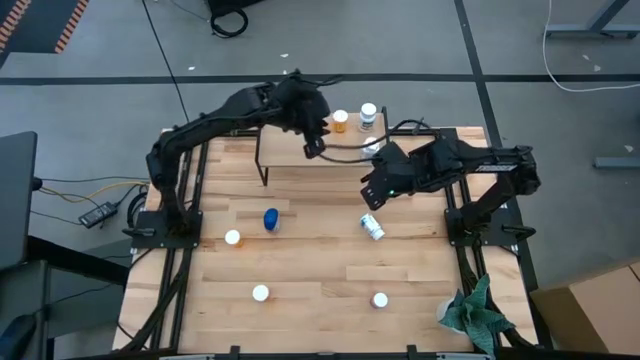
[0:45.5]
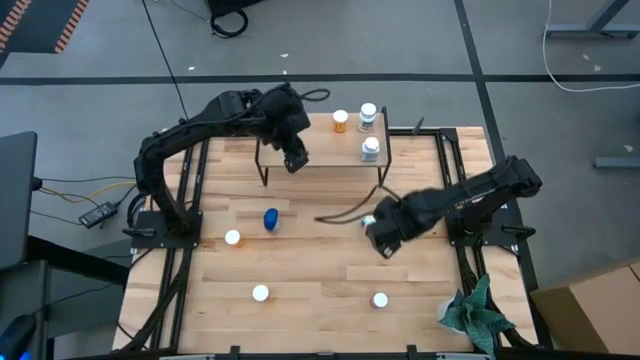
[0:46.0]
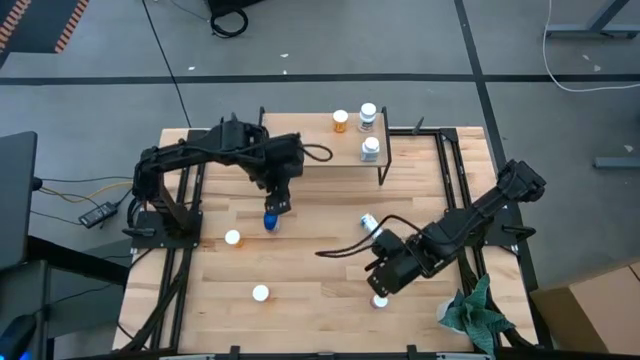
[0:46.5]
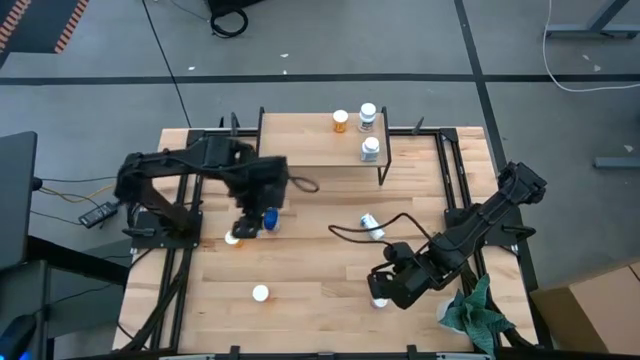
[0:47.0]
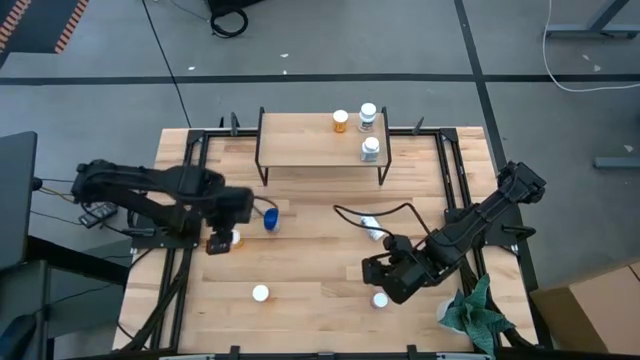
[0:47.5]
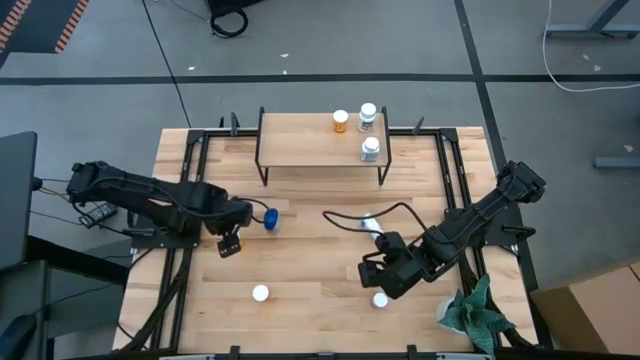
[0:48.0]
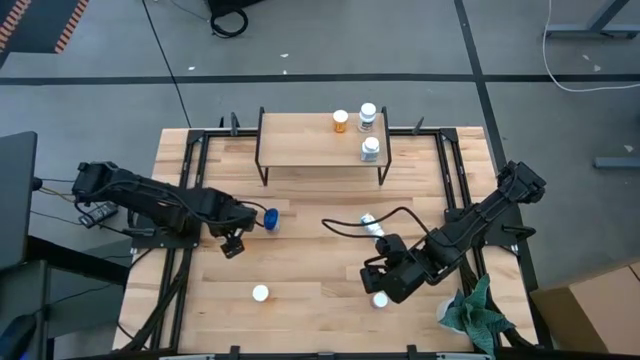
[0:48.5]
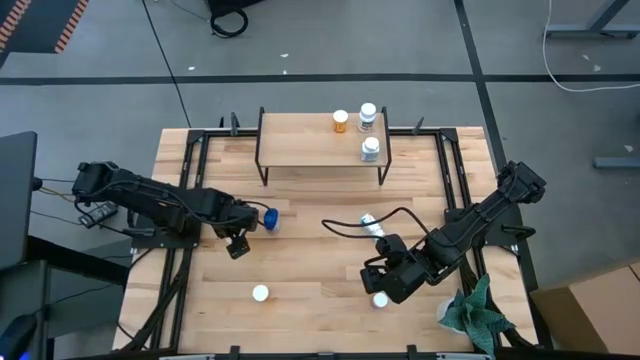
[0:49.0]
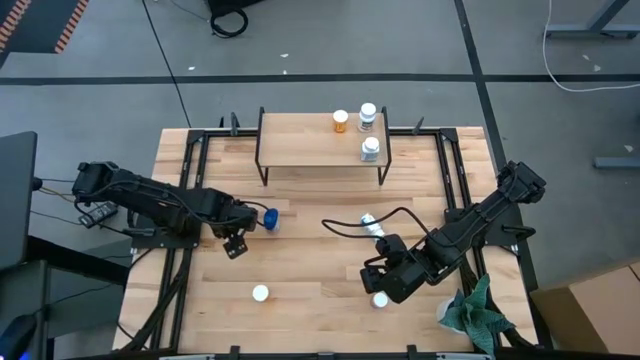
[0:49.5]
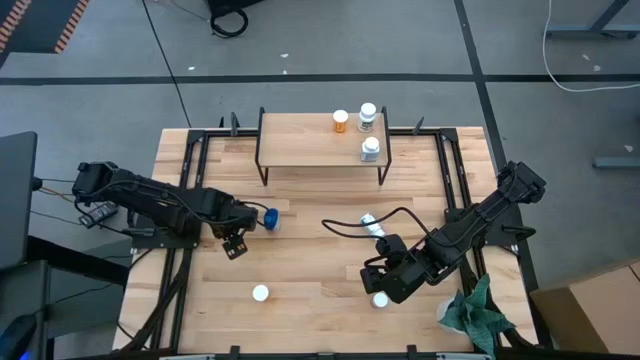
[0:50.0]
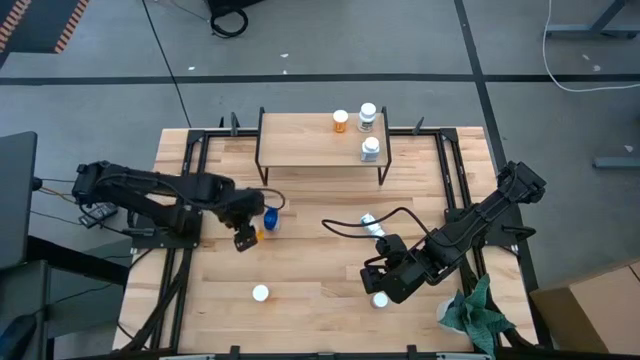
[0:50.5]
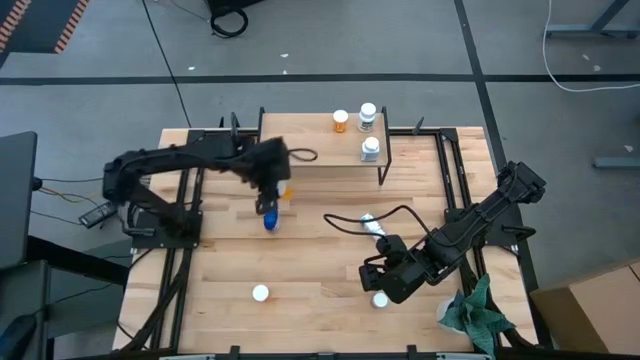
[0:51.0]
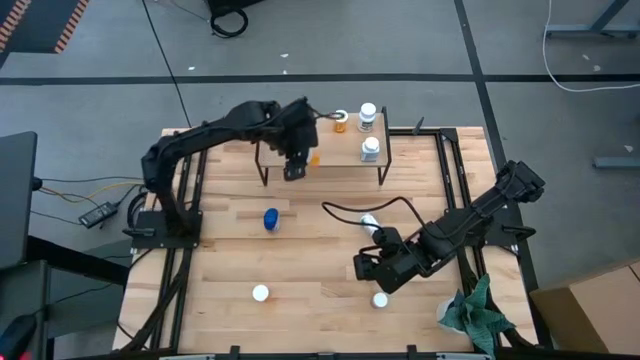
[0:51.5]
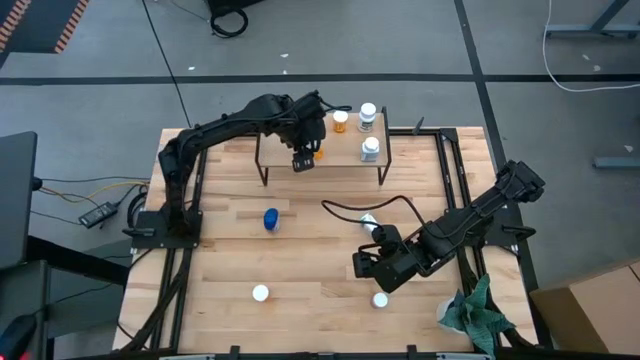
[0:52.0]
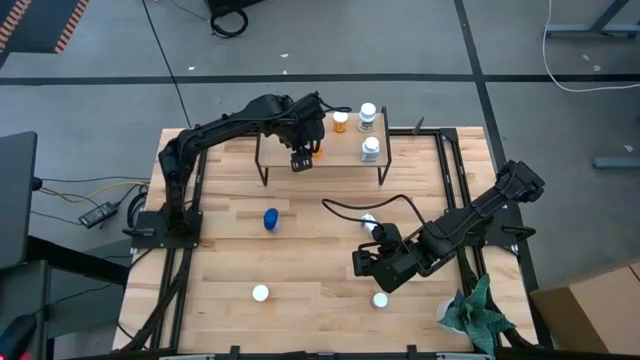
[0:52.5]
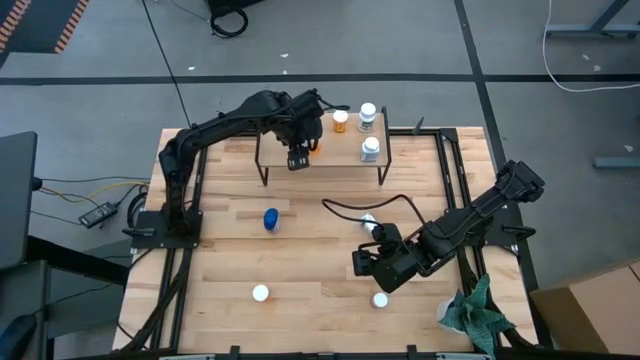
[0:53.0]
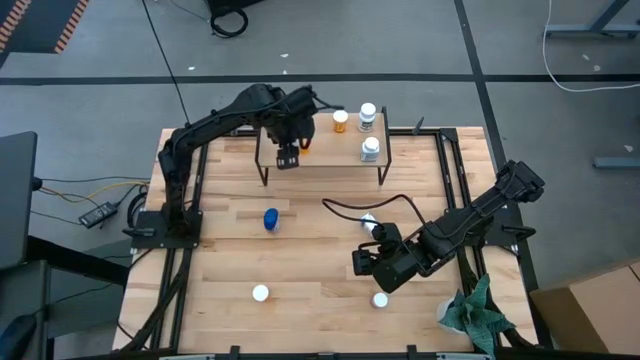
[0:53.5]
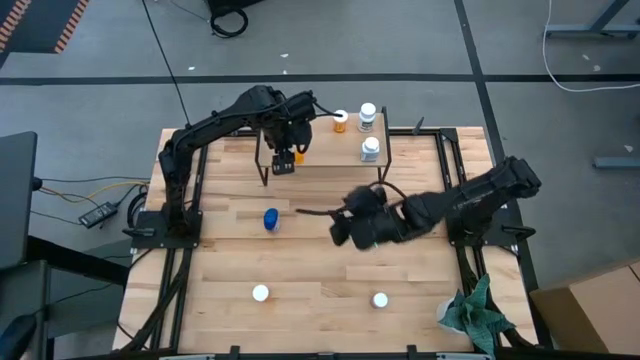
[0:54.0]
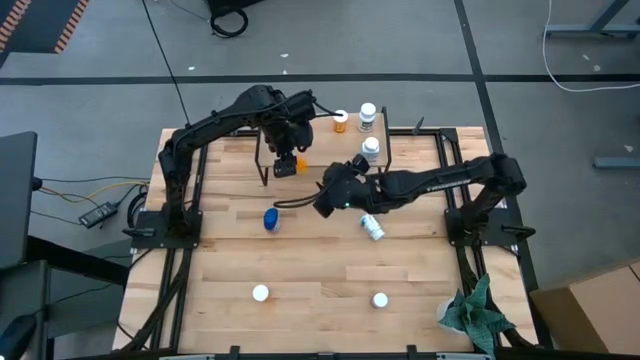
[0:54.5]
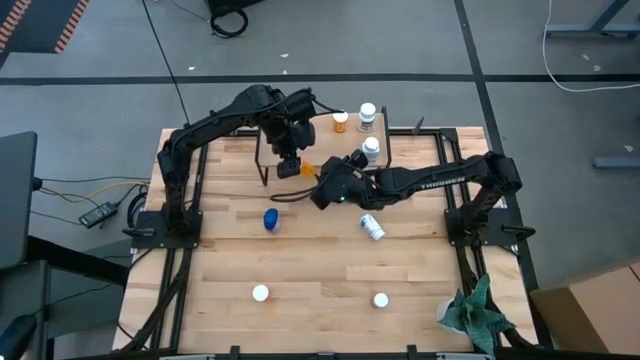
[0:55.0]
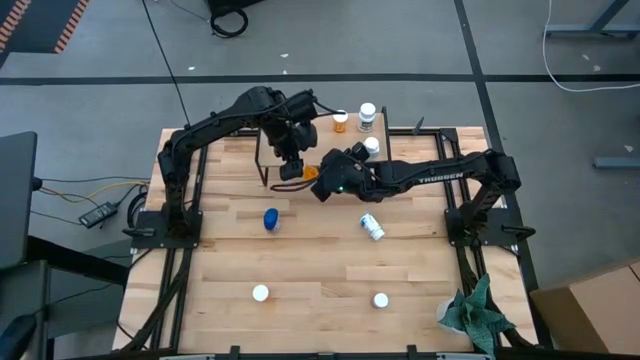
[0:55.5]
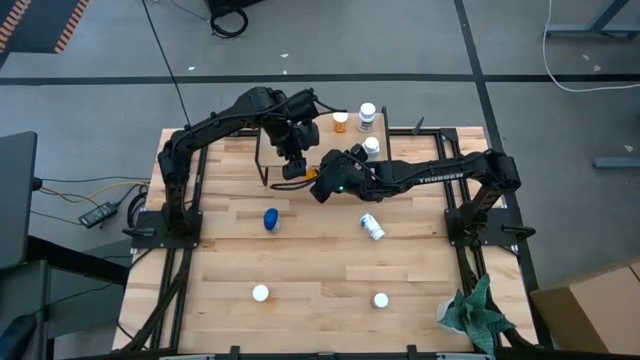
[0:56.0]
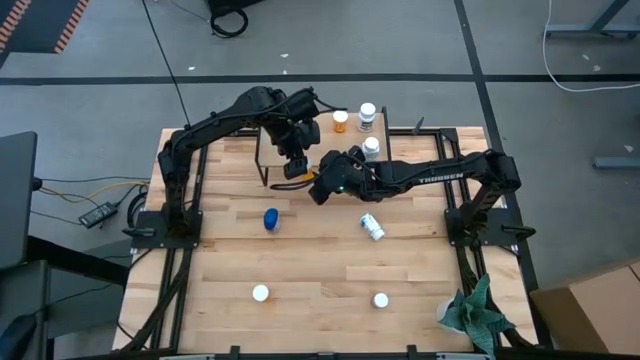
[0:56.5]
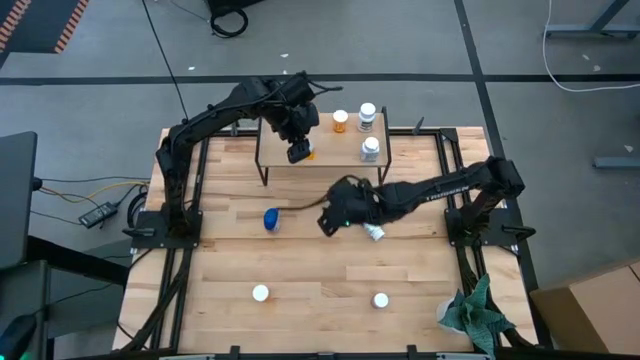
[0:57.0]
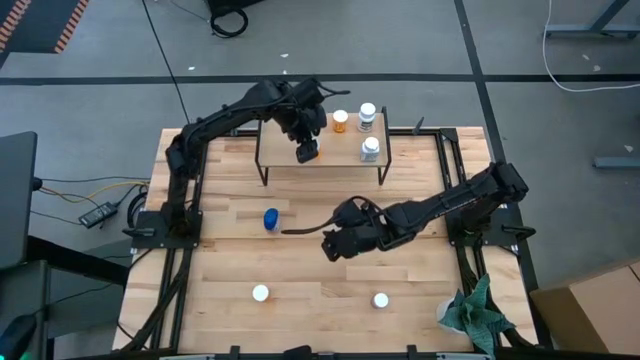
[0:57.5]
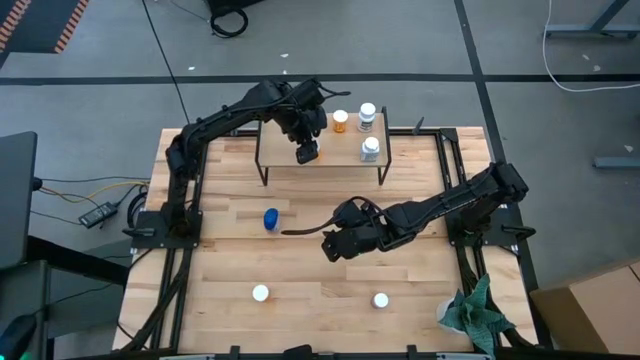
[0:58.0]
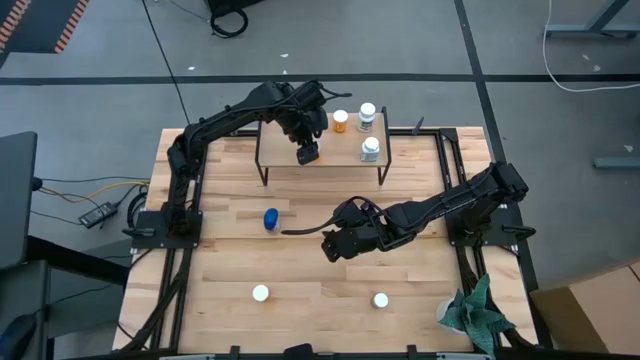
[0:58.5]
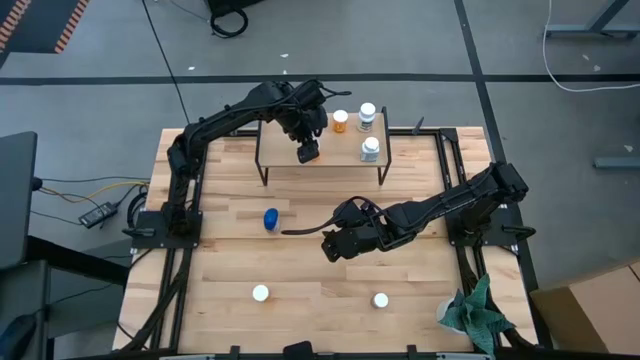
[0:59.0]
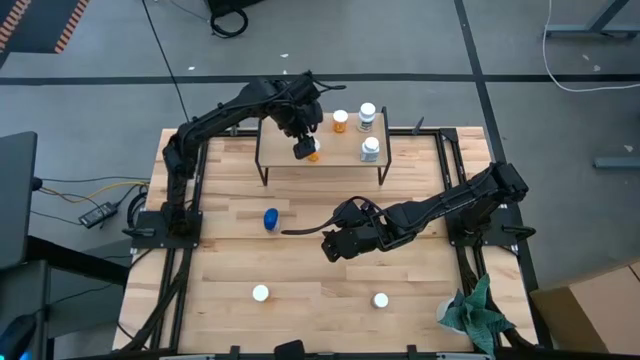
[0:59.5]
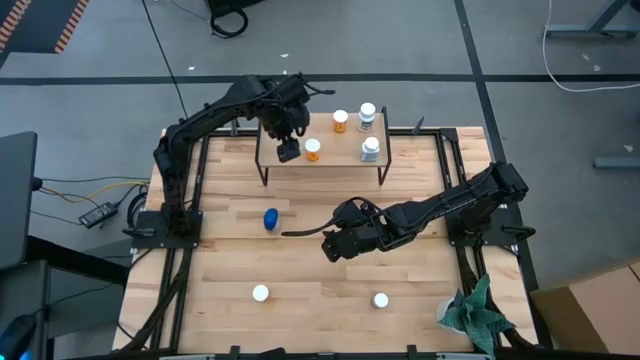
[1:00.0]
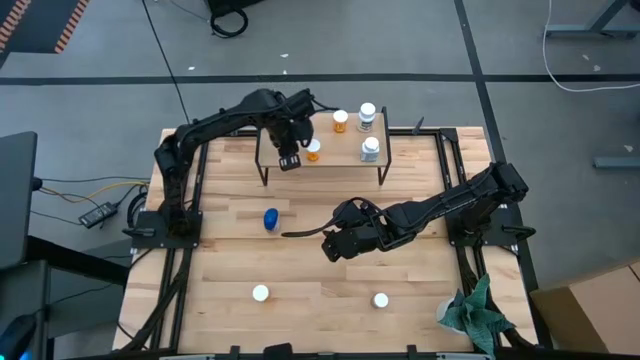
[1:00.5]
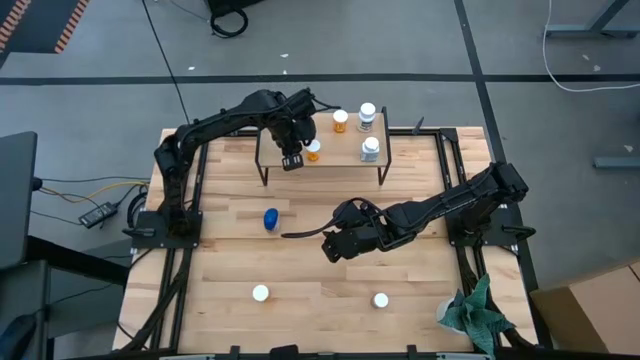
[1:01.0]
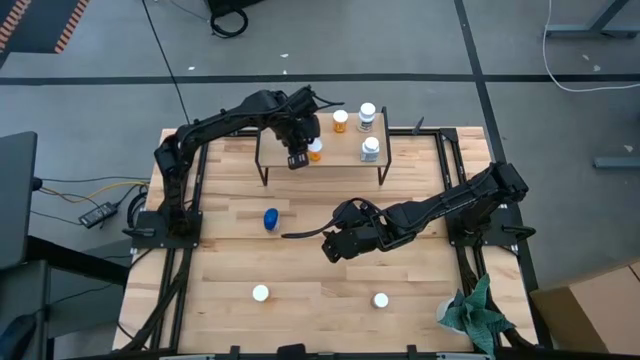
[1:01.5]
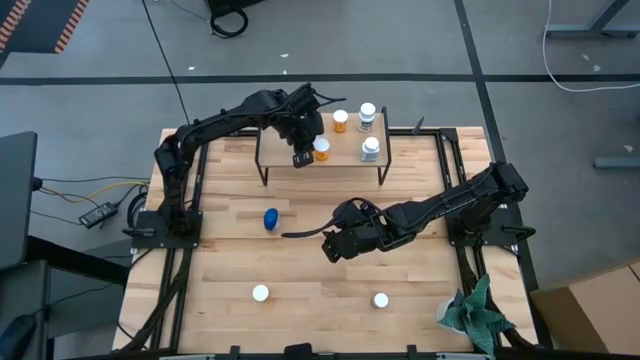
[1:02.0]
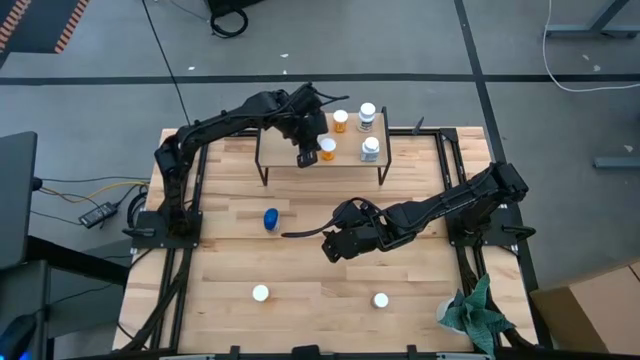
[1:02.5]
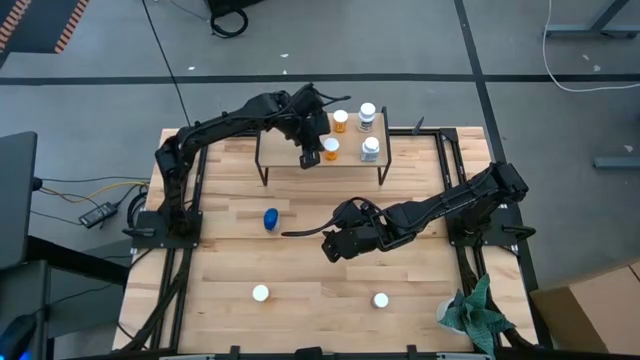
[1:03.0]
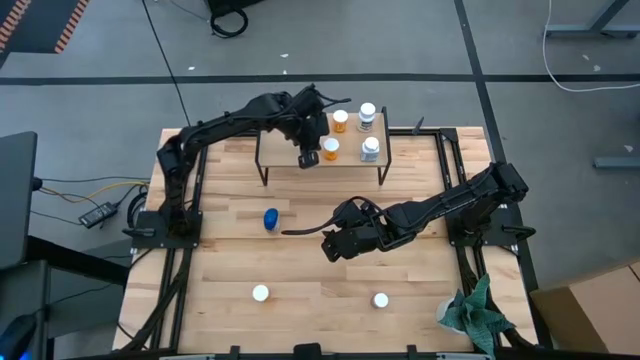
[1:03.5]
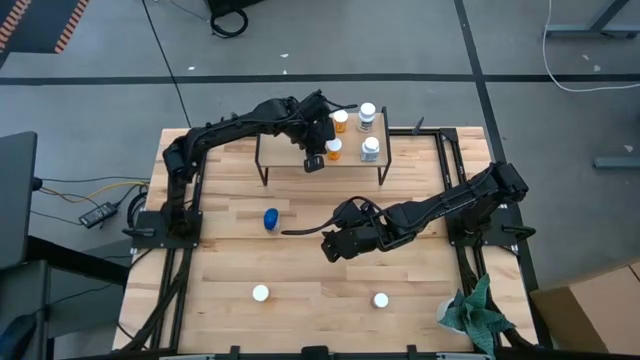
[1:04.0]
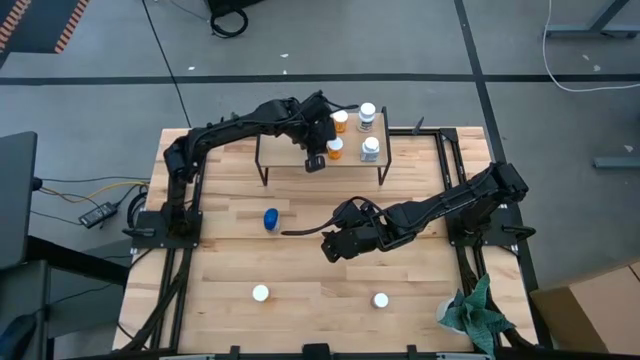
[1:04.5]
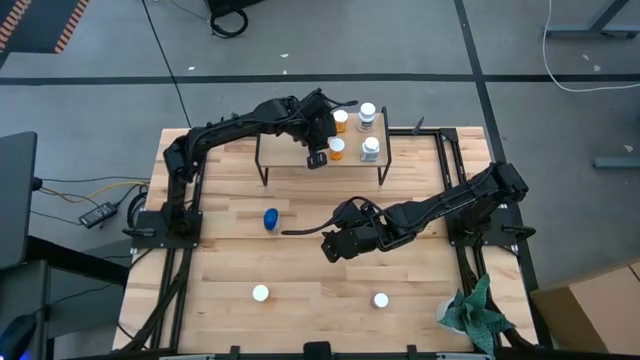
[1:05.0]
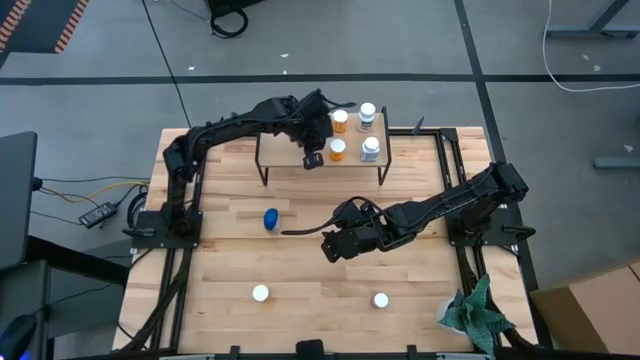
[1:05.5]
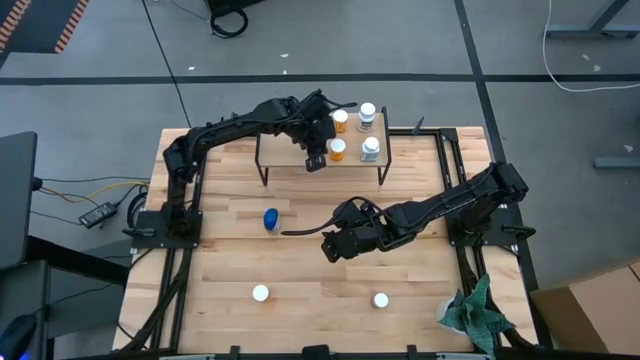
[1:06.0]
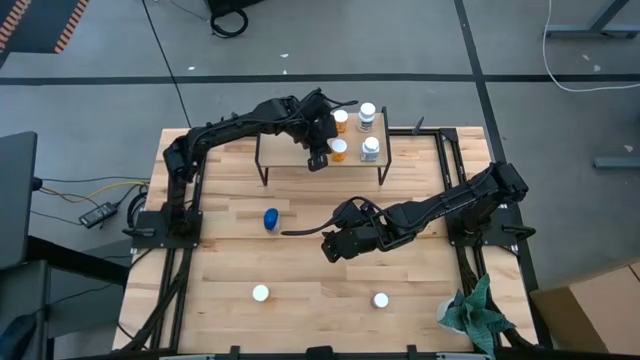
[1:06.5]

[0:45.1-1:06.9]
Task: Pick and place medicine bottles onto shelf by color
Put the top orange medicine bottle on the shelf
